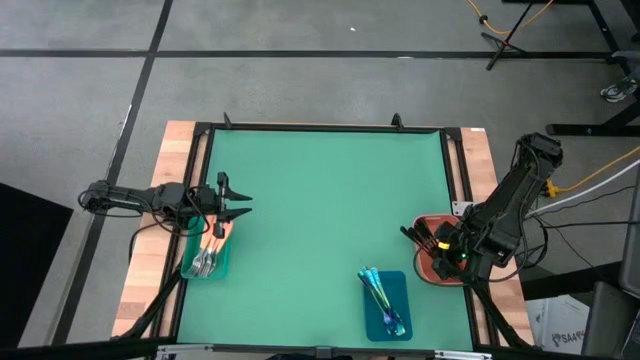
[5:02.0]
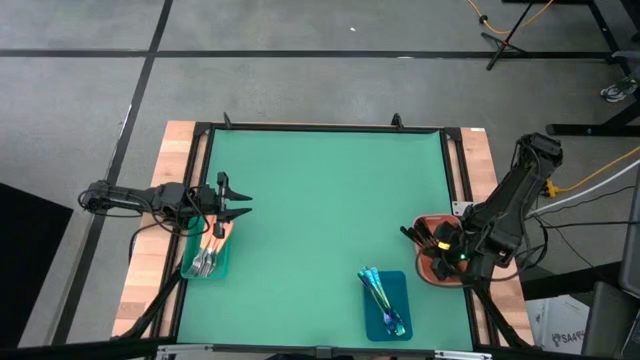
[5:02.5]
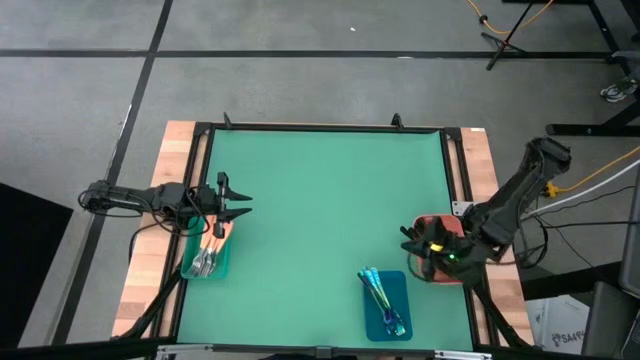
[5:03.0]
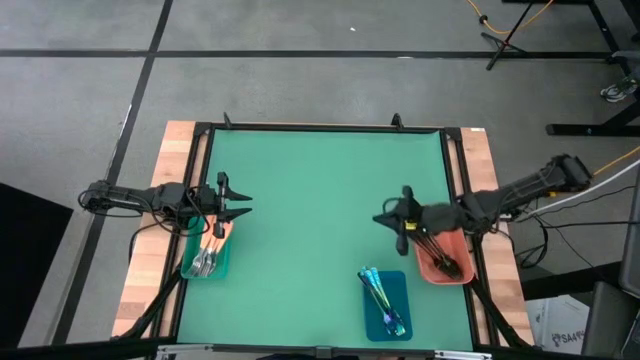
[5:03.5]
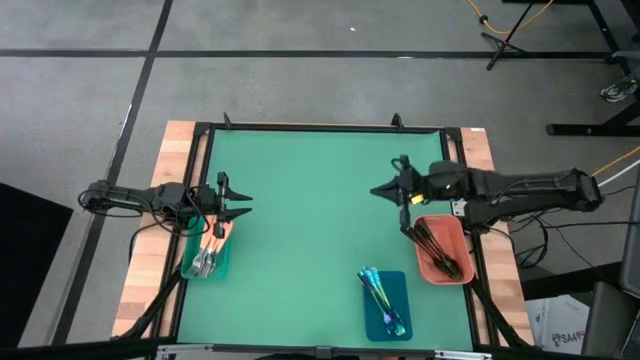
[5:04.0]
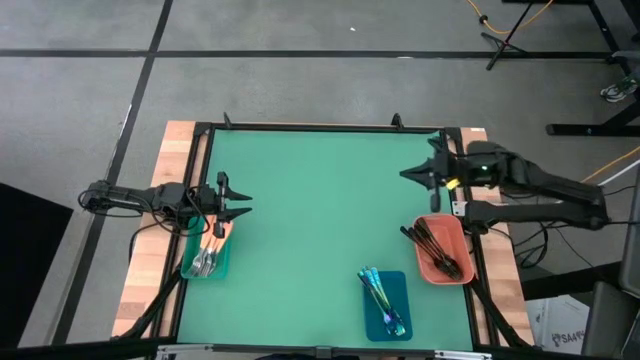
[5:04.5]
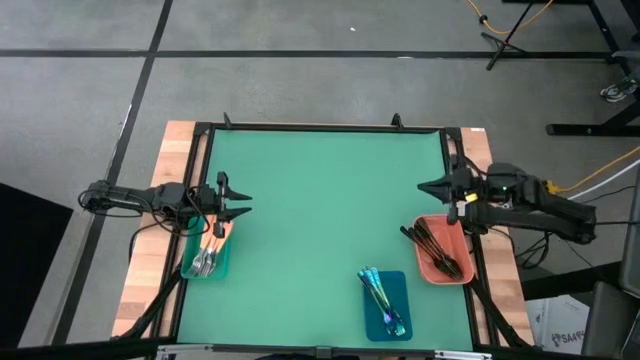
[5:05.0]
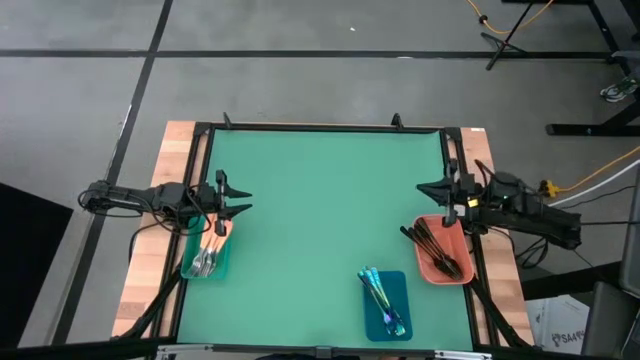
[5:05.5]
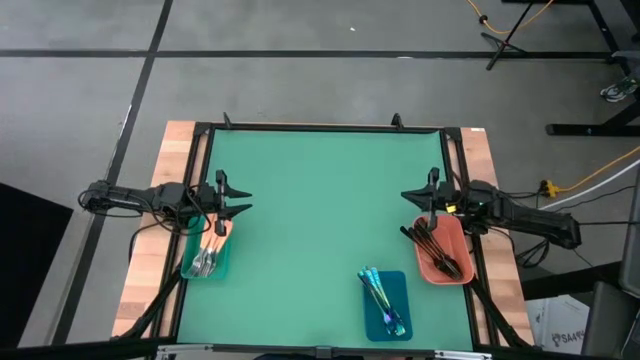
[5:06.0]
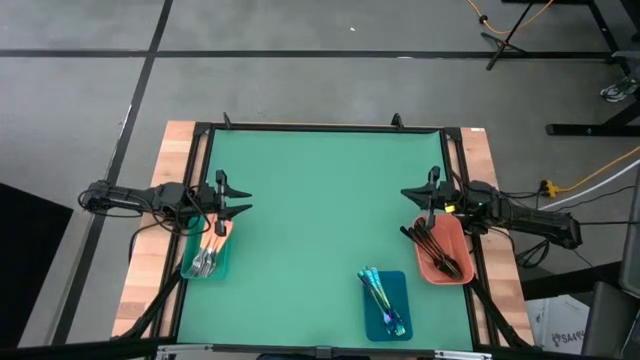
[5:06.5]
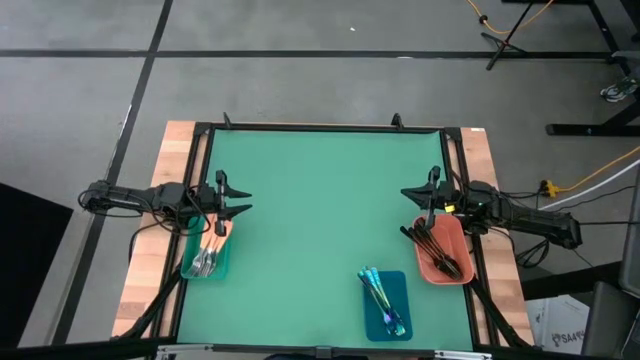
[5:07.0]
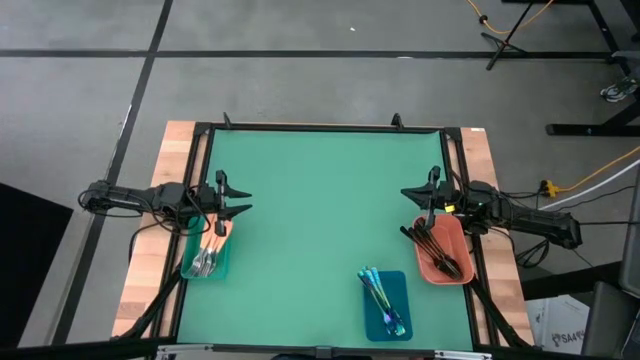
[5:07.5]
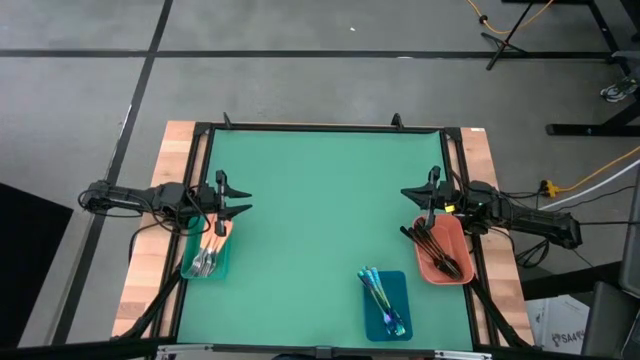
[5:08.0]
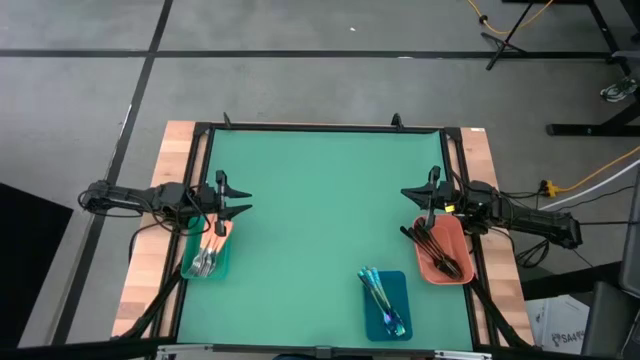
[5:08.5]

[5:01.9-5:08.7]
Task: Sort silverware by color (type)
Return to Home Position

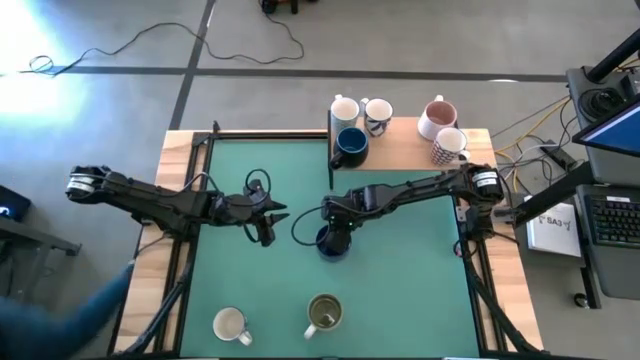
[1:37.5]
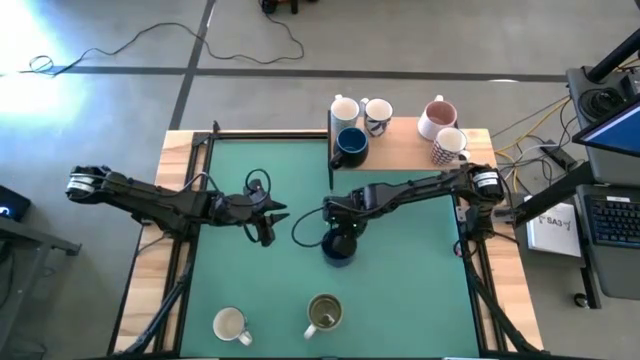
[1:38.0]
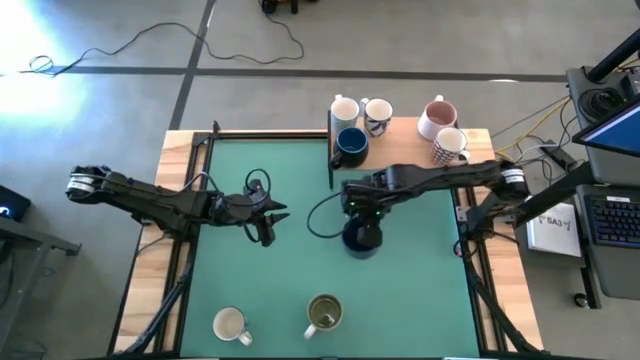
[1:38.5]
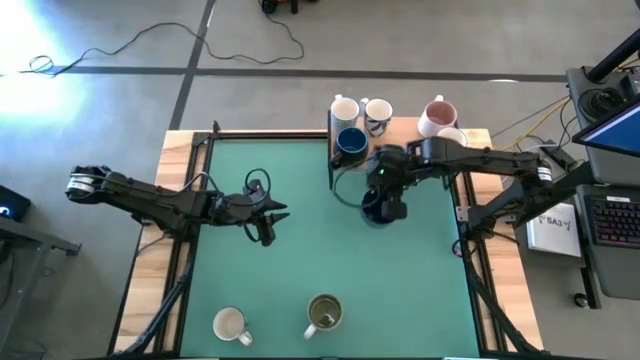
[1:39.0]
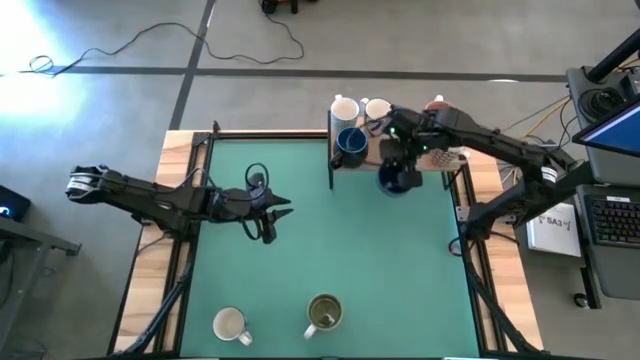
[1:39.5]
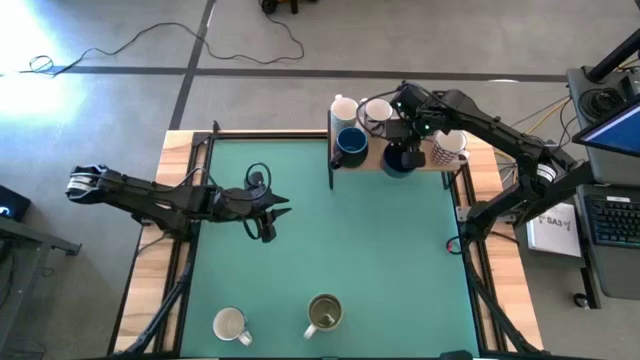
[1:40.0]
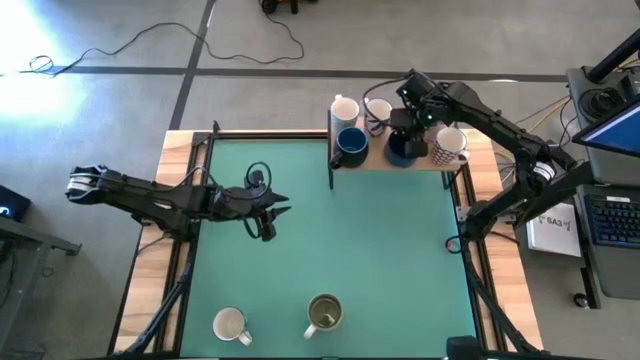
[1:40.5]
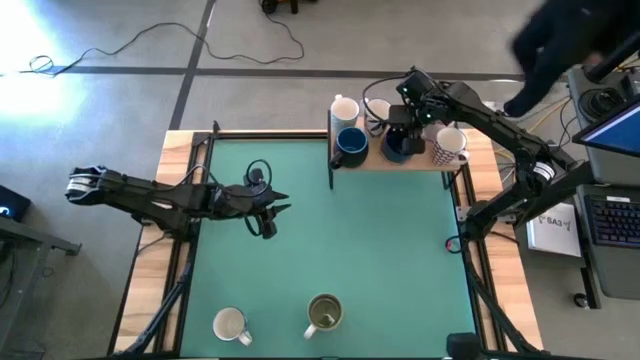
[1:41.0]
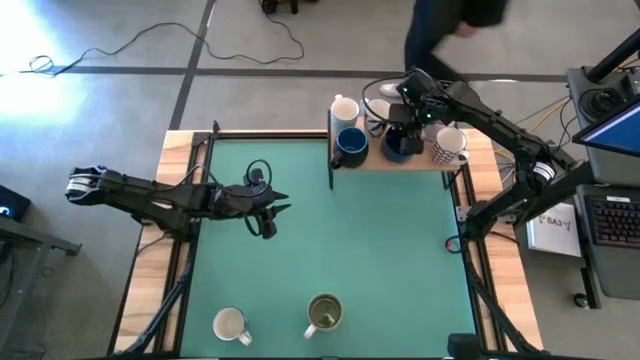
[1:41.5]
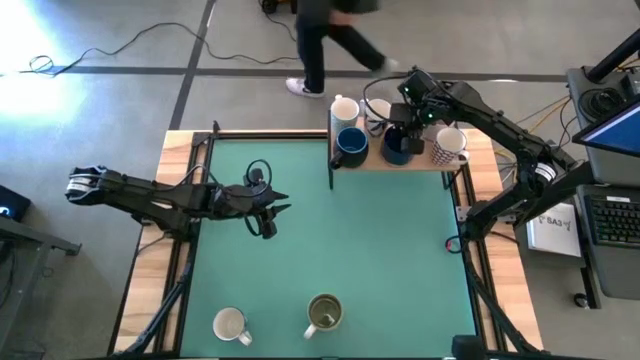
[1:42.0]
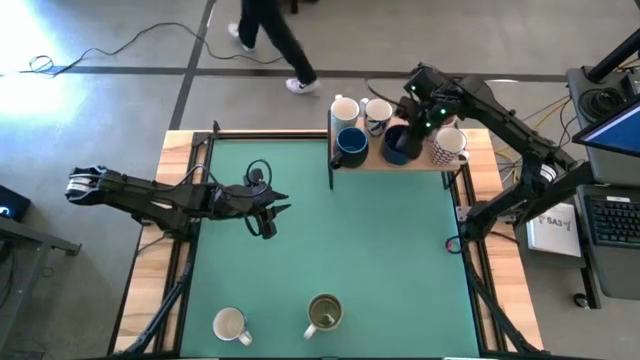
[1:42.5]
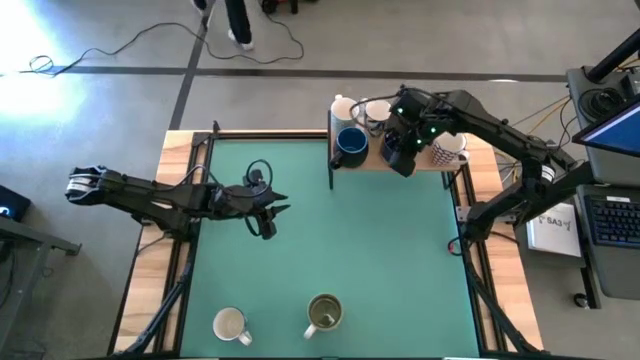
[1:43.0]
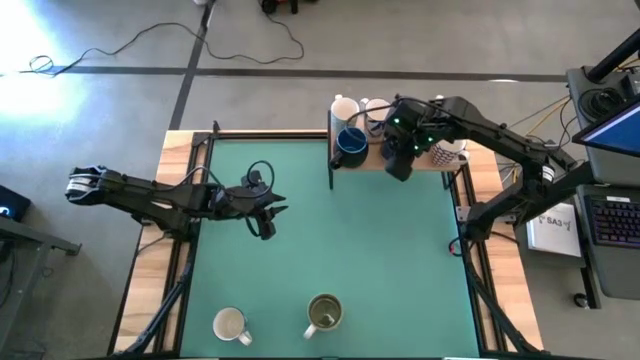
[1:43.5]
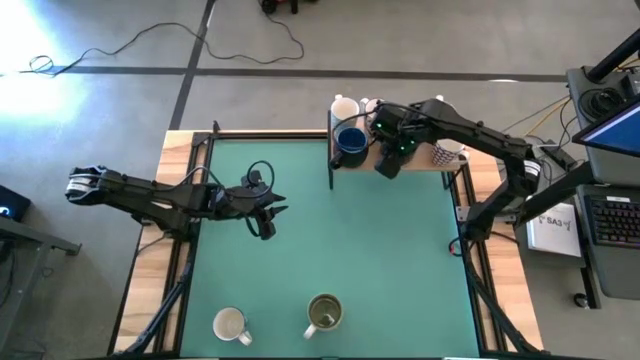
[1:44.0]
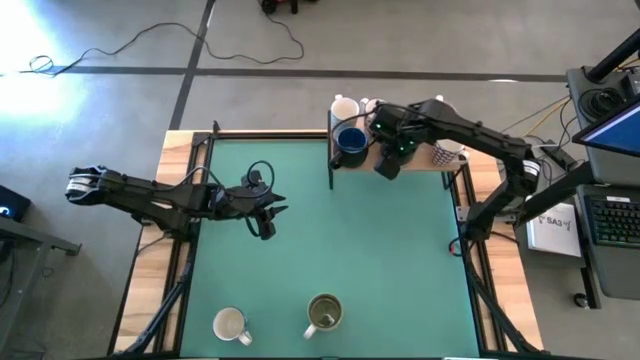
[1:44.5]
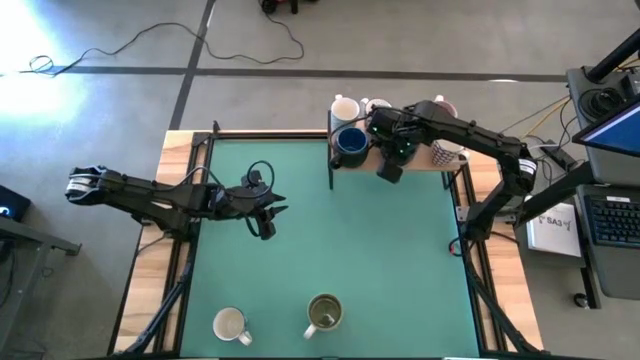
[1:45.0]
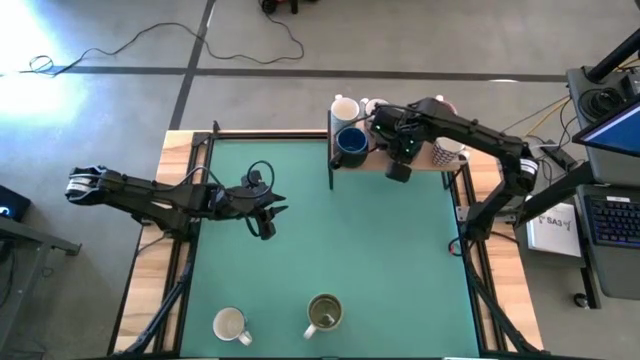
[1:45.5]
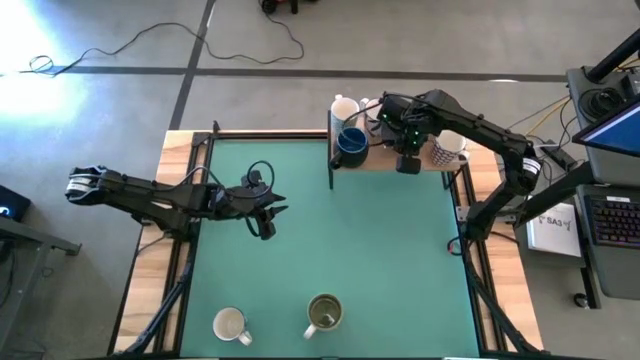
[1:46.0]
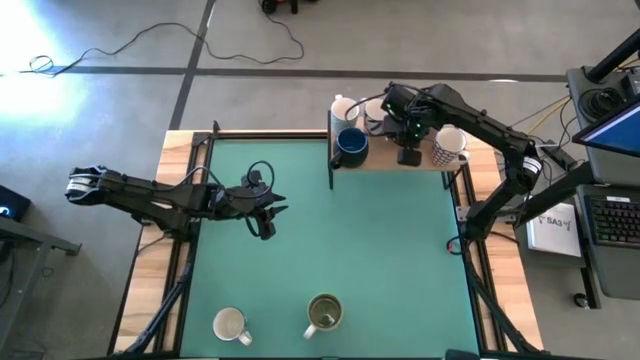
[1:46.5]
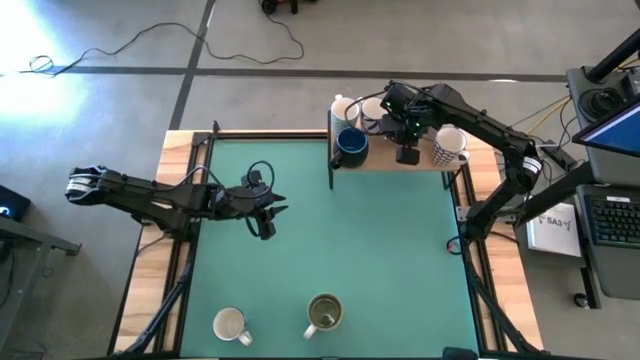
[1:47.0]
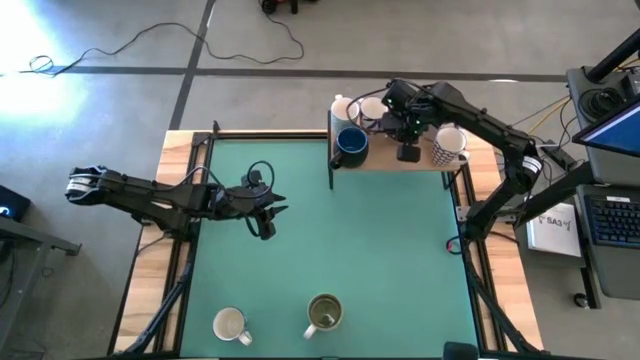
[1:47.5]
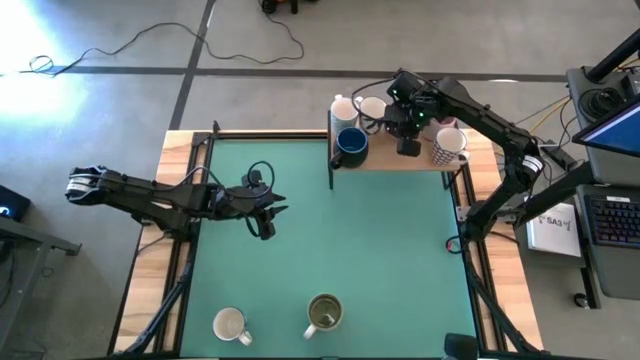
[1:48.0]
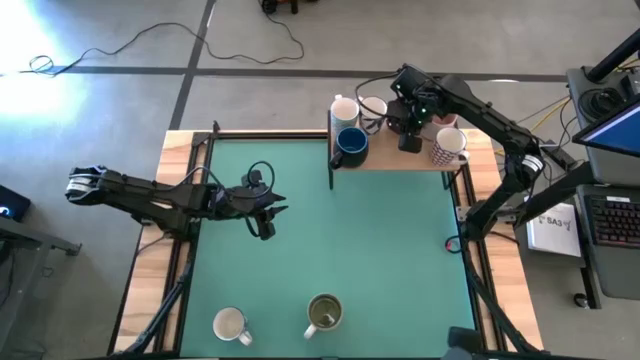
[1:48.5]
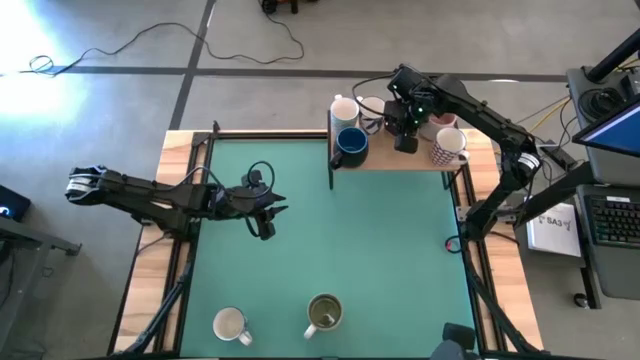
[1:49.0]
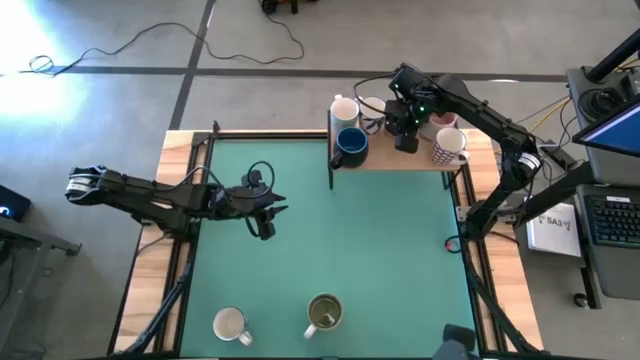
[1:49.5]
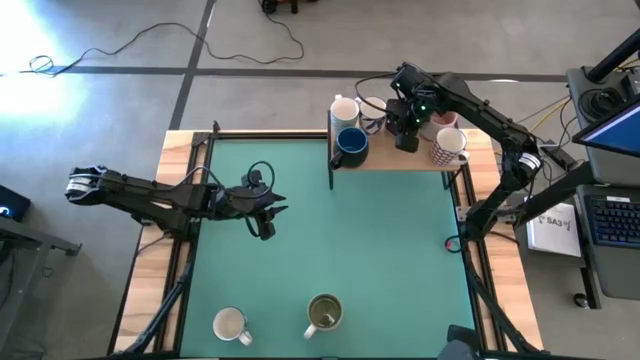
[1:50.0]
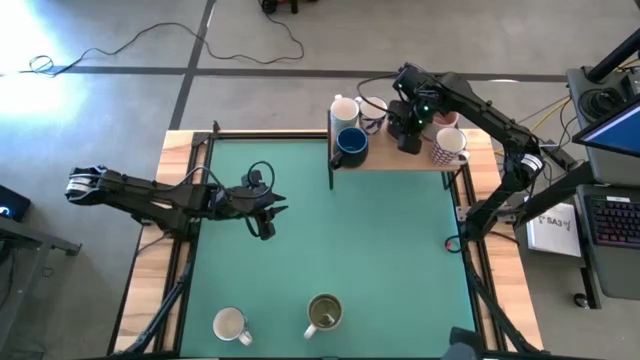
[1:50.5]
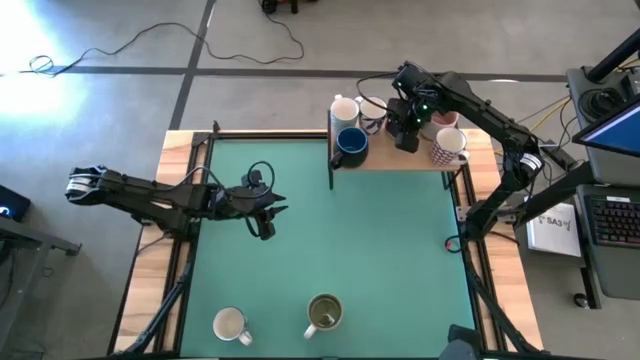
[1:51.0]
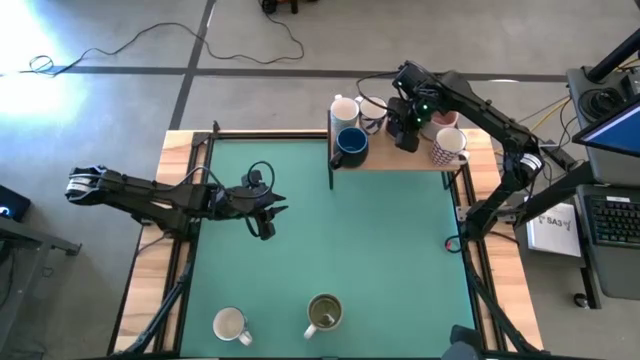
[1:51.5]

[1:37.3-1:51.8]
Task: Place coffee mugs
Put the blue mug on the shelf
